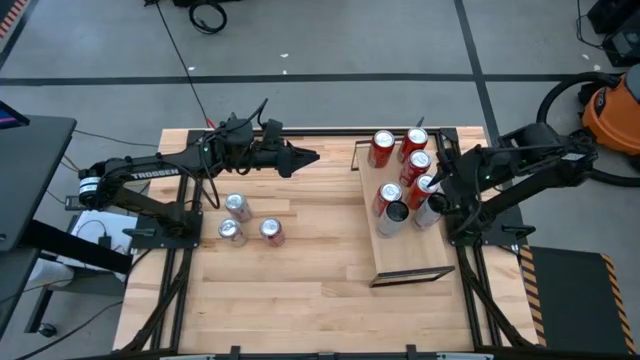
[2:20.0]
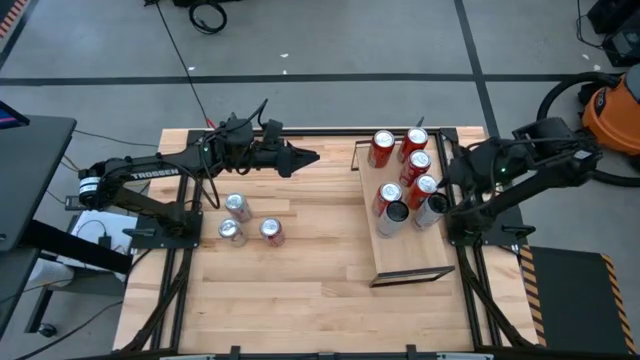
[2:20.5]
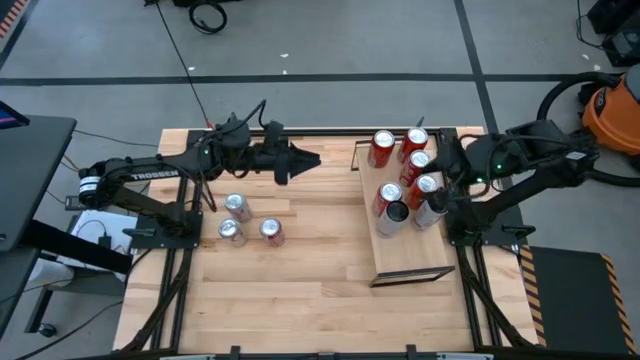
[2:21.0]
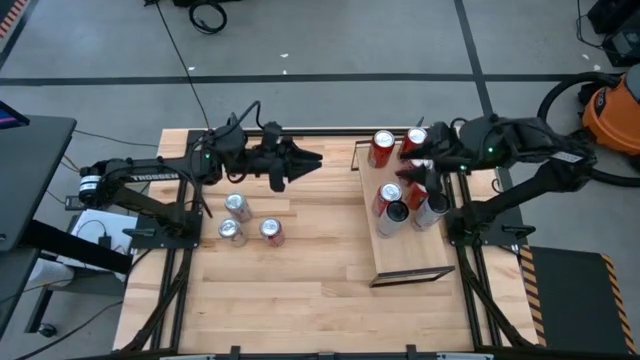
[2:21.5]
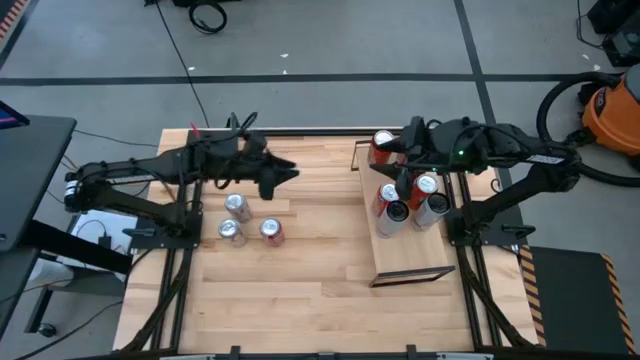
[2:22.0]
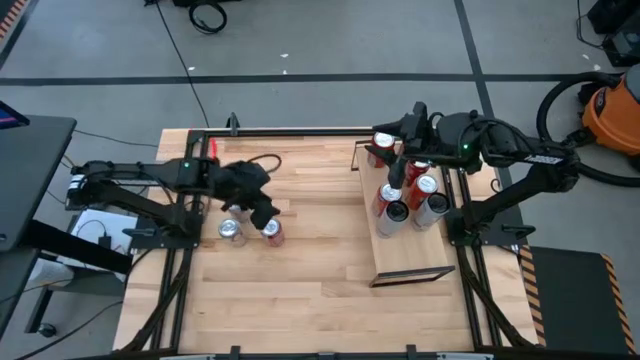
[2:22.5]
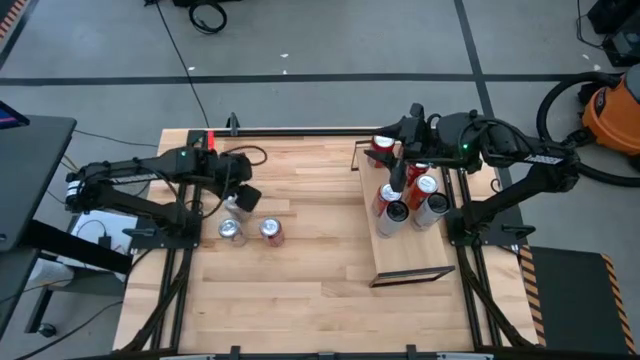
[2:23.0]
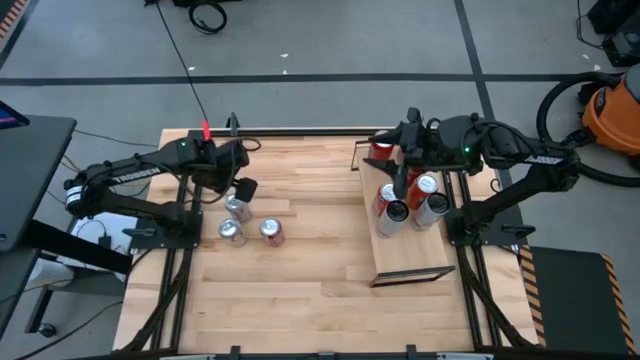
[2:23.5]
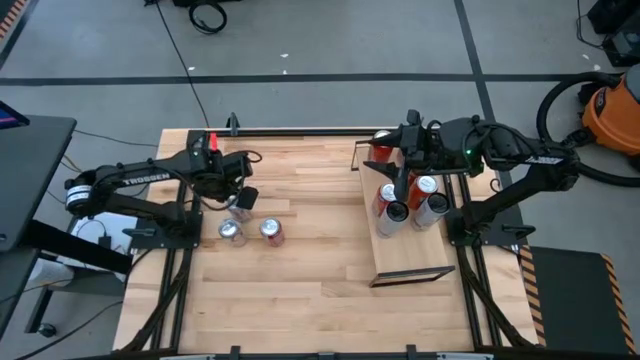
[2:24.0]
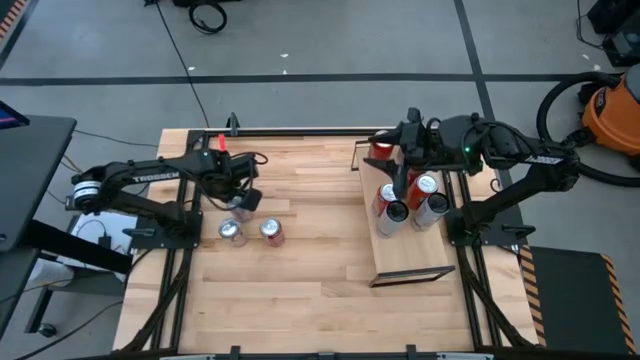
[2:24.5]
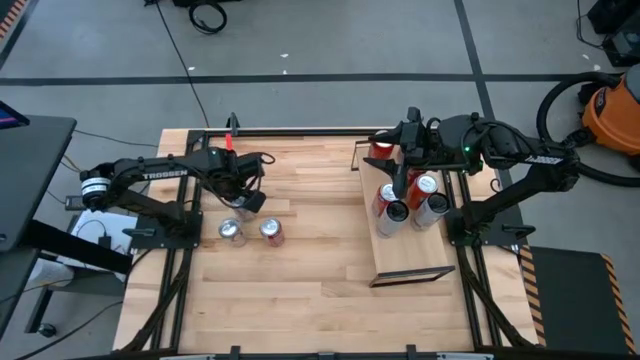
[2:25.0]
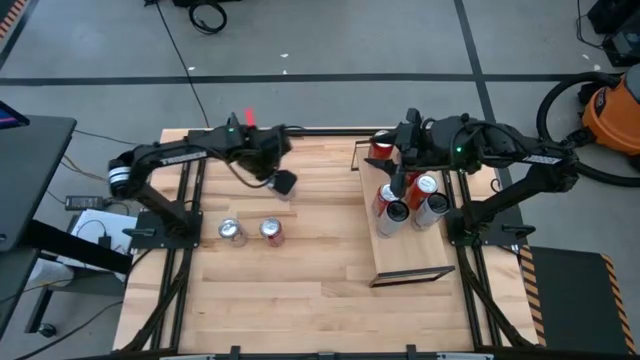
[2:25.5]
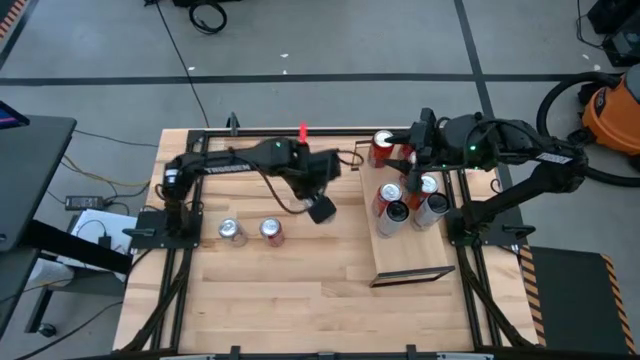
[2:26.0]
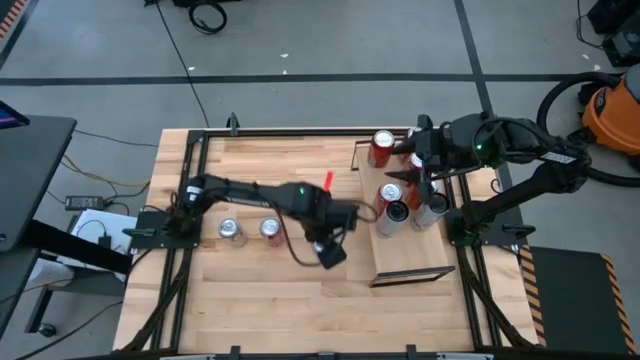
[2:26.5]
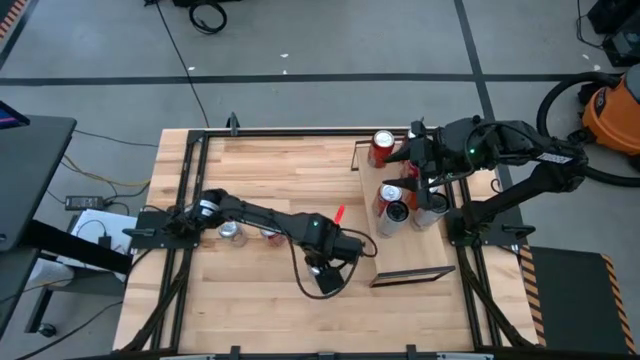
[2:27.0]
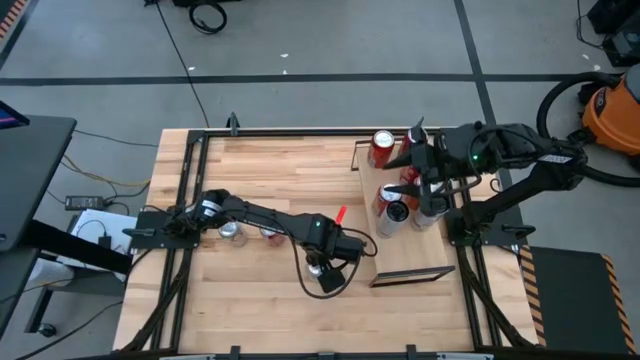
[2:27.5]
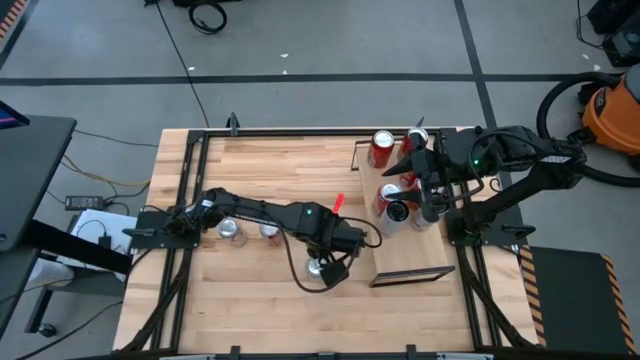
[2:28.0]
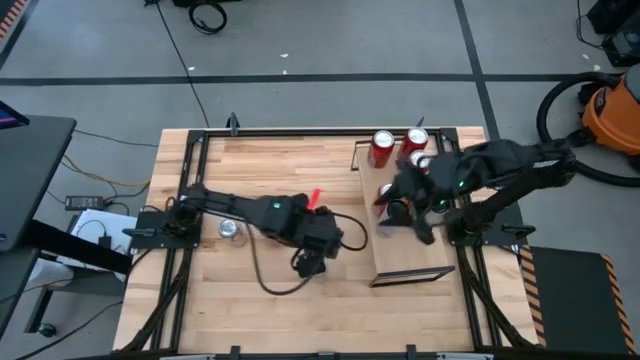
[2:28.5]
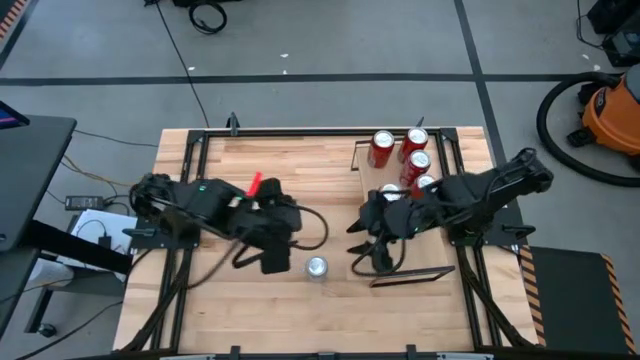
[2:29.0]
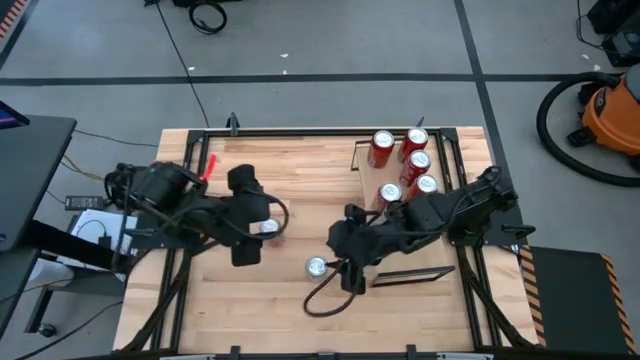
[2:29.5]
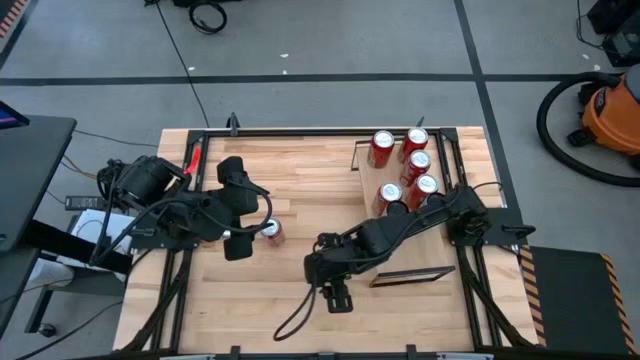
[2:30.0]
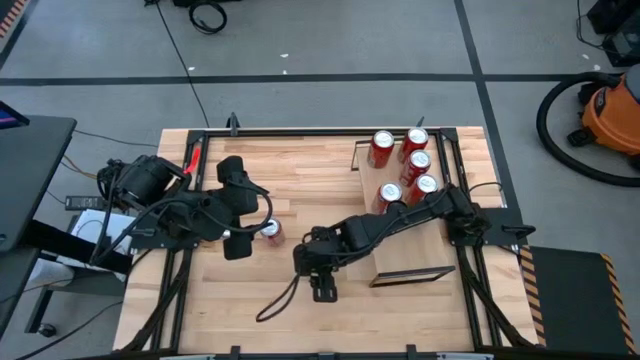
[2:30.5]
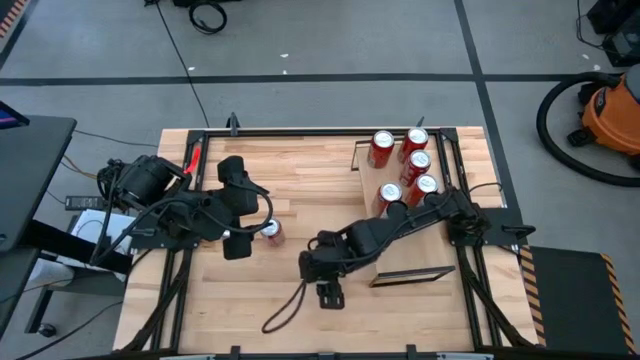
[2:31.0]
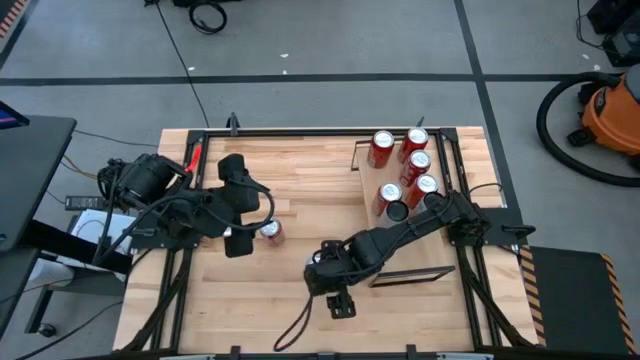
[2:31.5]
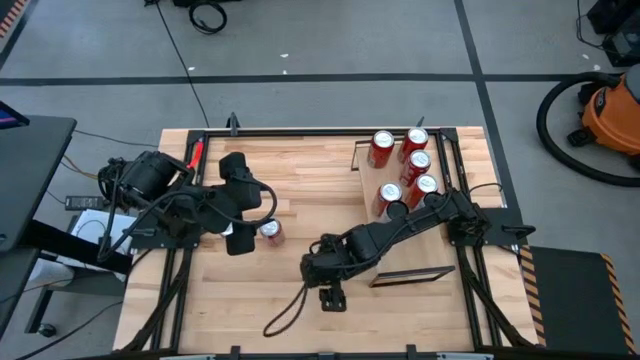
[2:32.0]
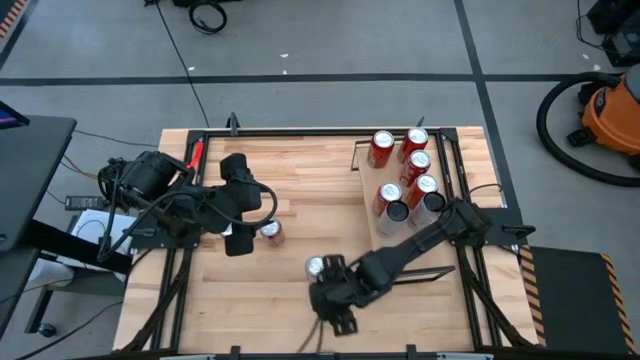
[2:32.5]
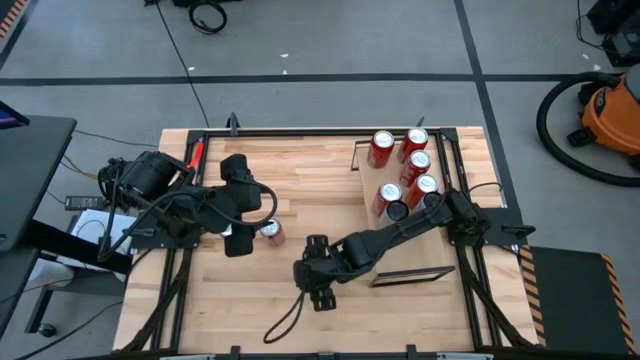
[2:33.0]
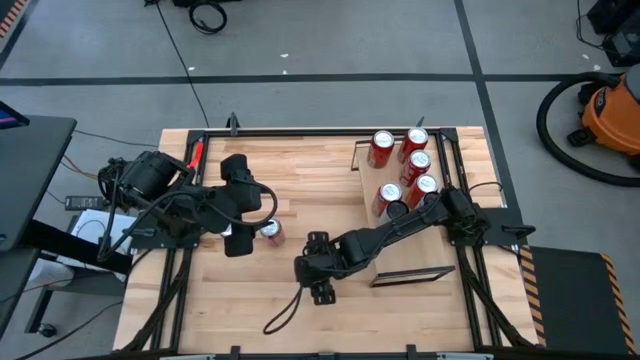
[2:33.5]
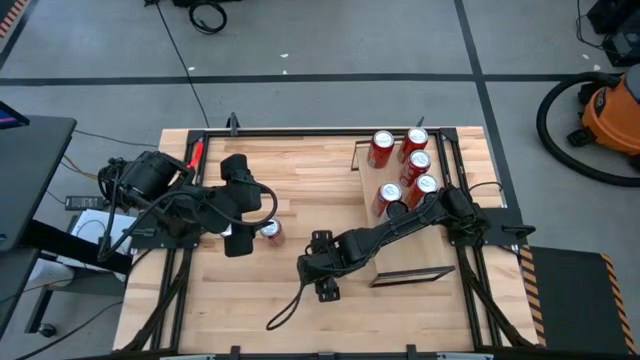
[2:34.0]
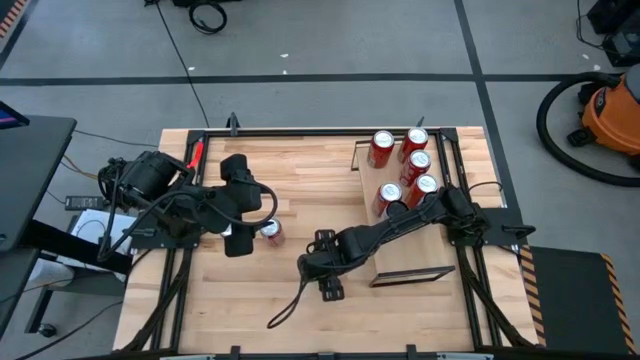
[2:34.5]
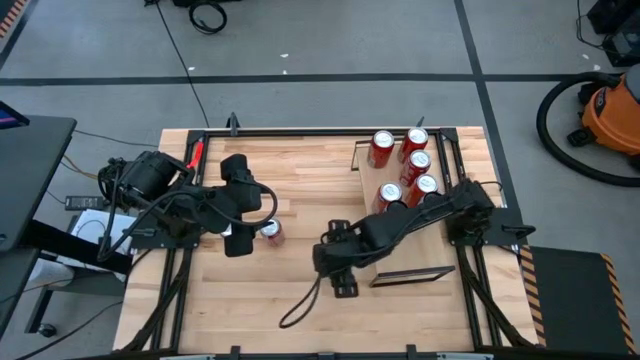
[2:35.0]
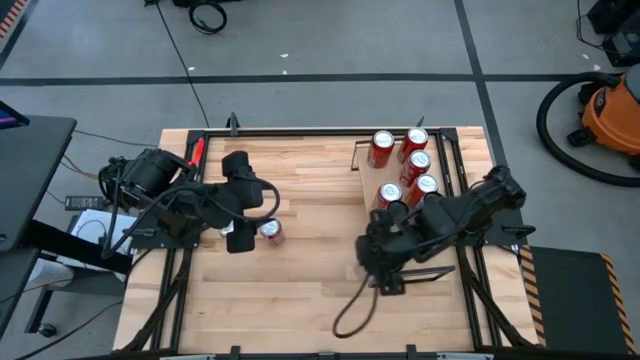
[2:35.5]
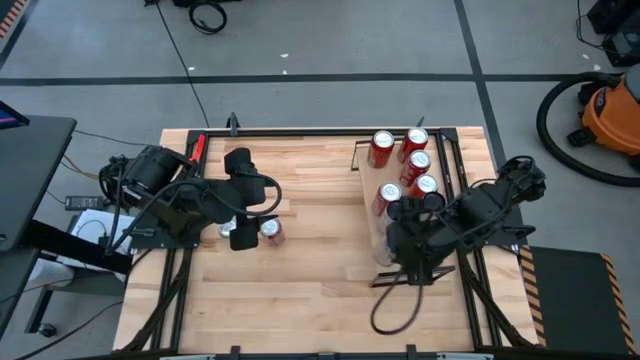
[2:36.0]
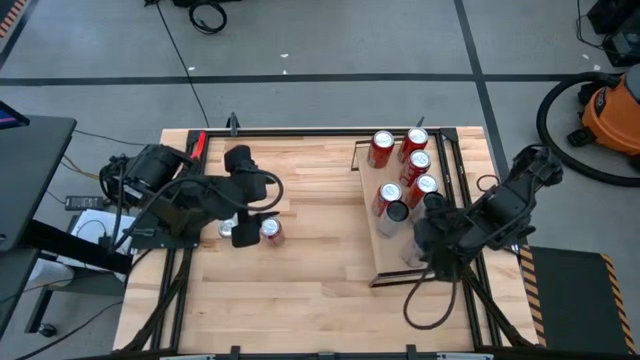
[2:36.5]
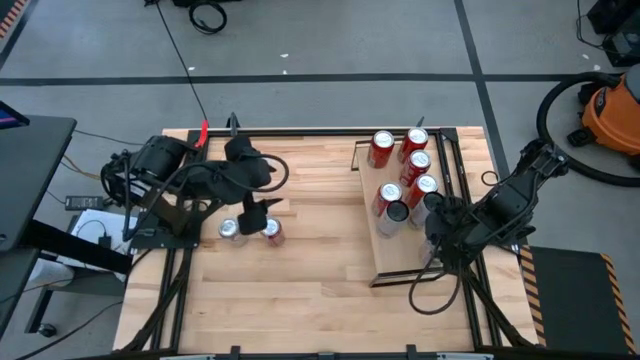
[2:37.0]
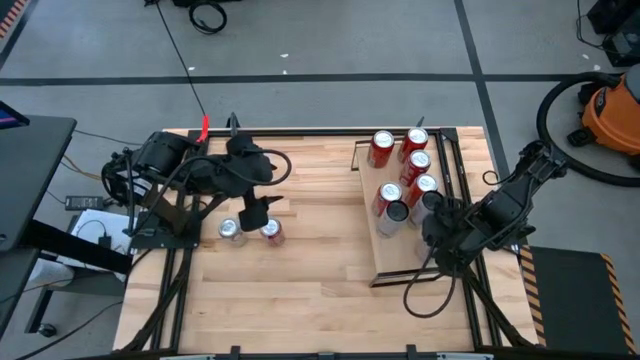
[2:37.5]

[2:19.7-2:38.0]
Task: Place canned beverage on shelf
Put the top red silver soda can on the shelf

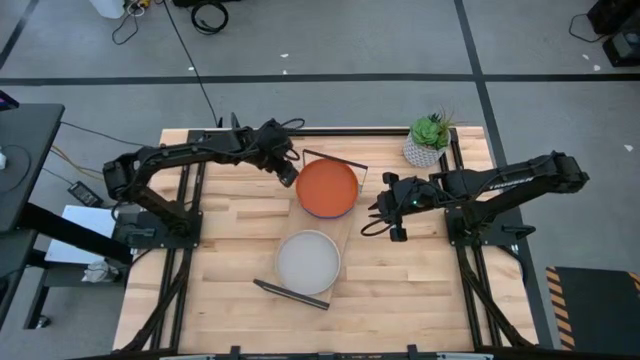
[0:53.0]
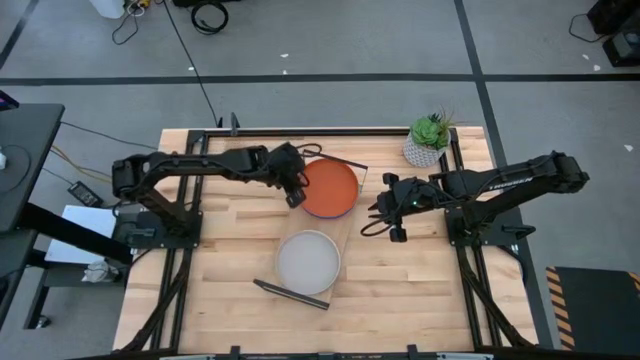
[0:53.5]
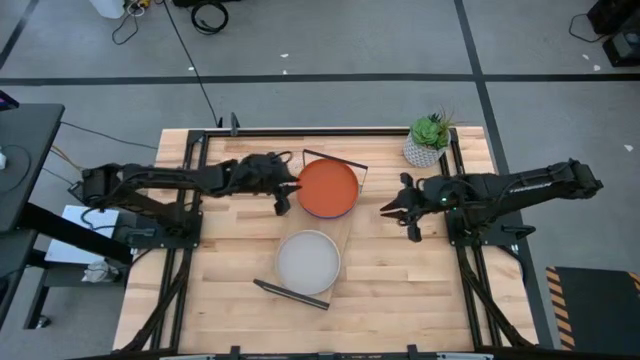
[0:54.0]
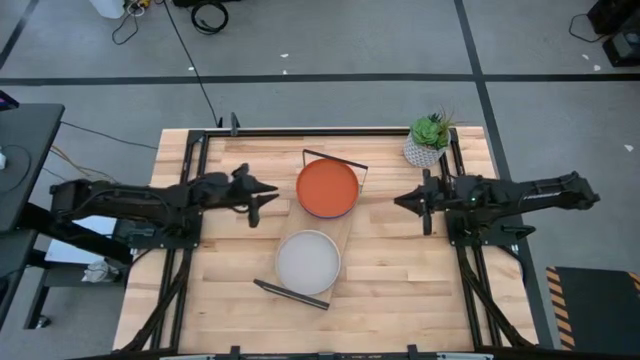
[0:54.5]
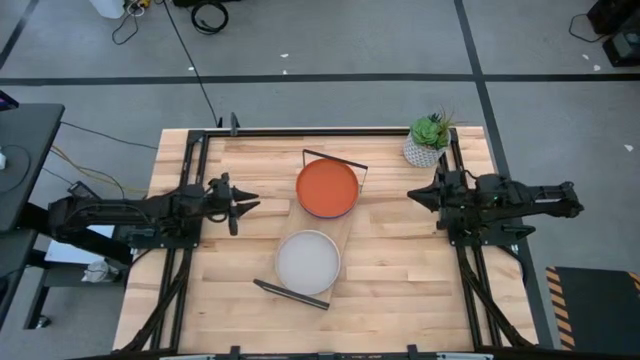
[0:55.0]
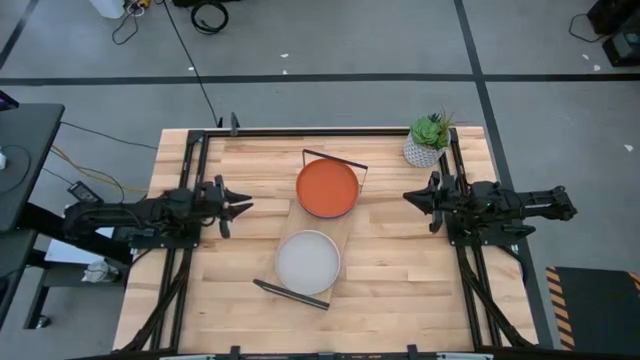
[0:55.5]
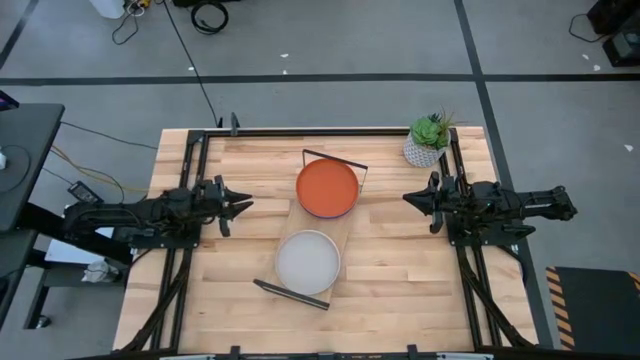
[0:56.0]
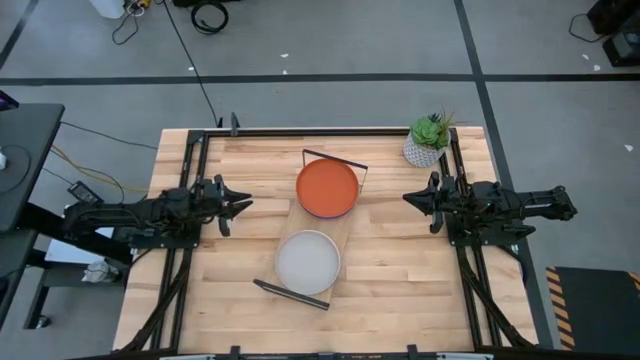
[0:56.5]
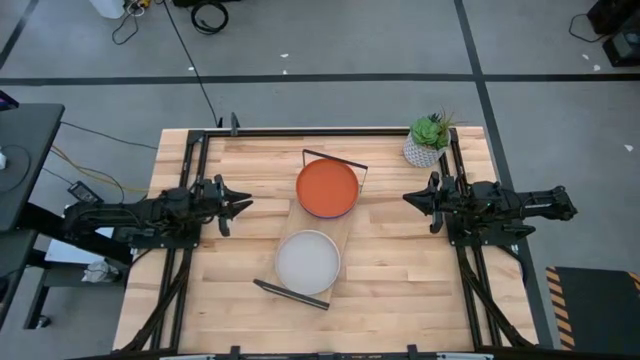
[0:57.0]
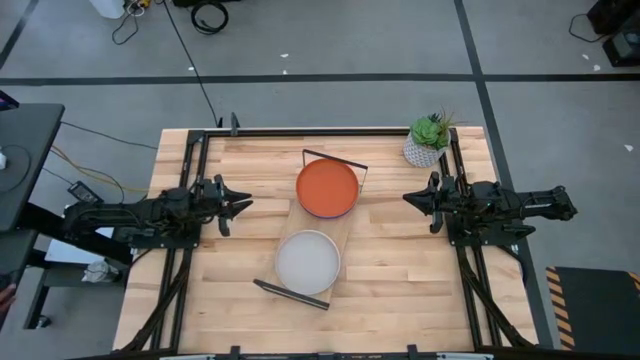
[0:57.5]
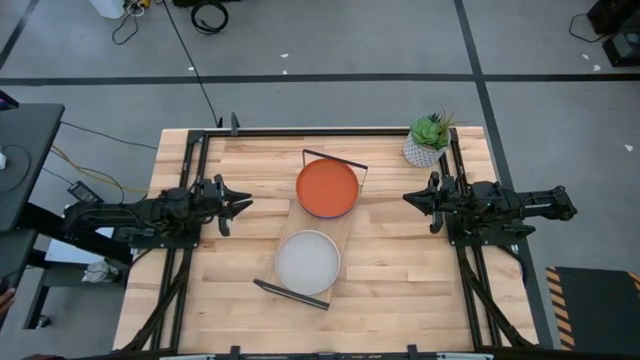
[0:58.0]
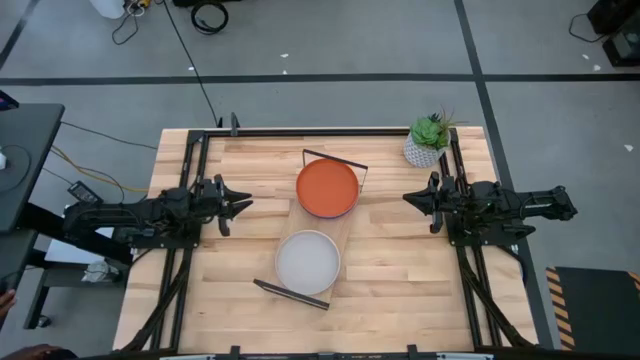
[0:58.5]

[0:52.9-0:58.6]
Task: Place and stack plates onto a shelf
Return to Home Position
